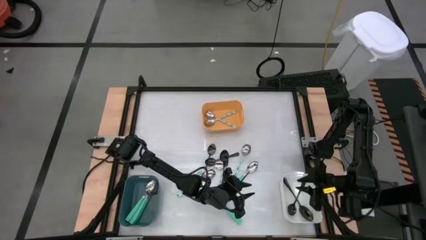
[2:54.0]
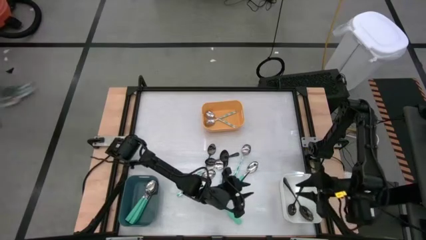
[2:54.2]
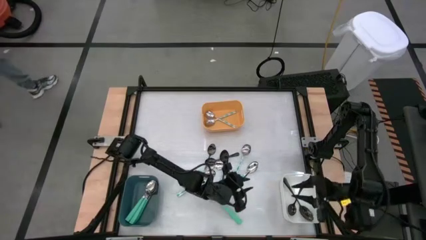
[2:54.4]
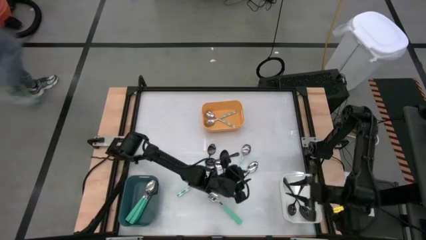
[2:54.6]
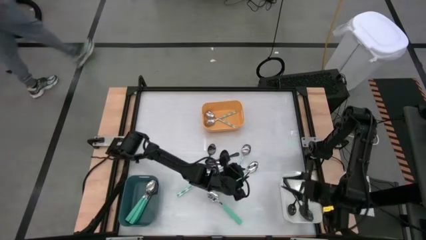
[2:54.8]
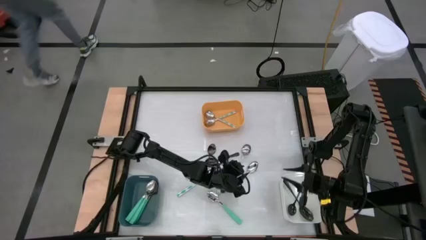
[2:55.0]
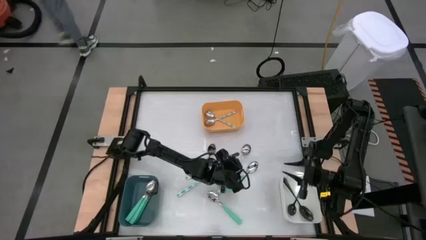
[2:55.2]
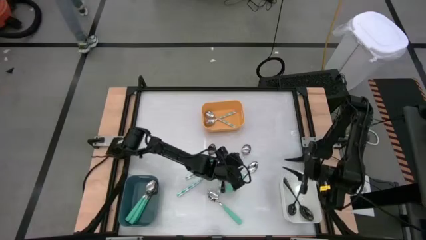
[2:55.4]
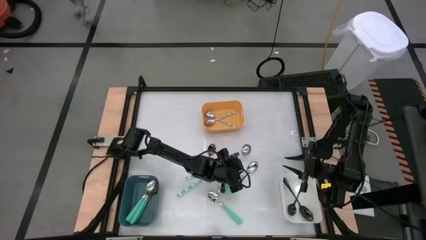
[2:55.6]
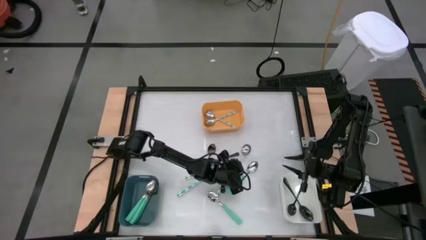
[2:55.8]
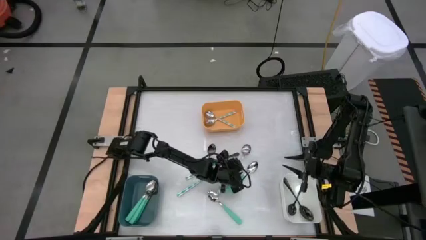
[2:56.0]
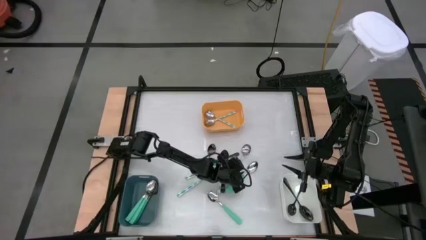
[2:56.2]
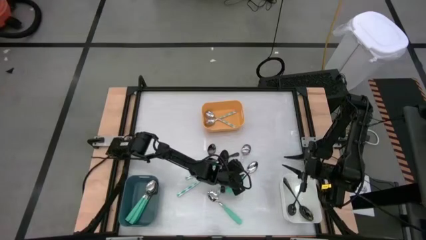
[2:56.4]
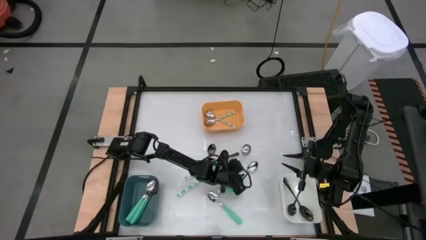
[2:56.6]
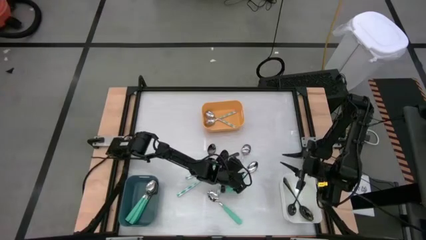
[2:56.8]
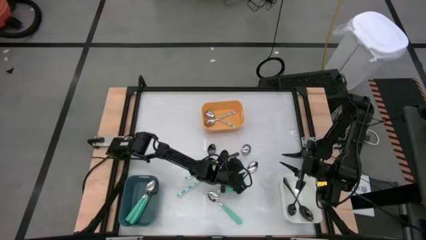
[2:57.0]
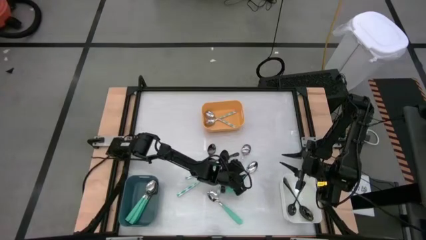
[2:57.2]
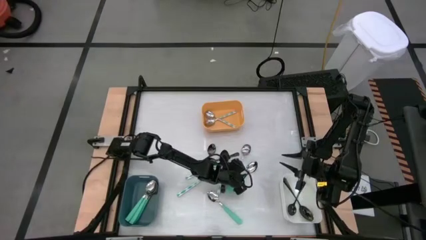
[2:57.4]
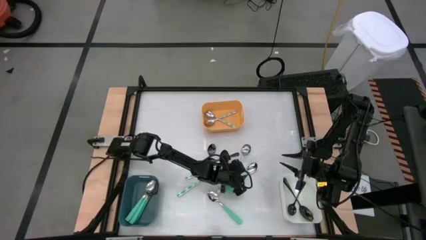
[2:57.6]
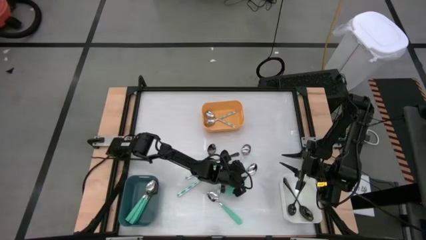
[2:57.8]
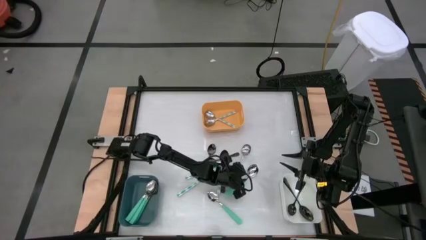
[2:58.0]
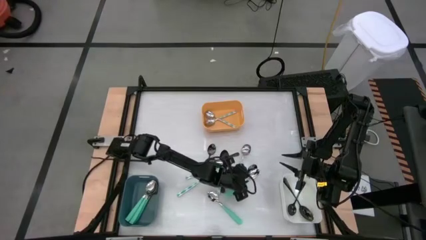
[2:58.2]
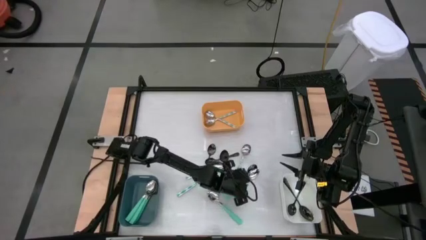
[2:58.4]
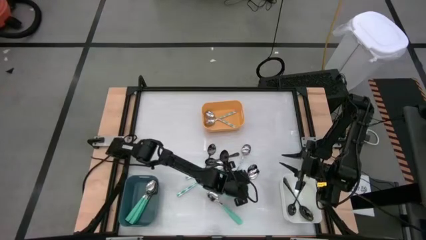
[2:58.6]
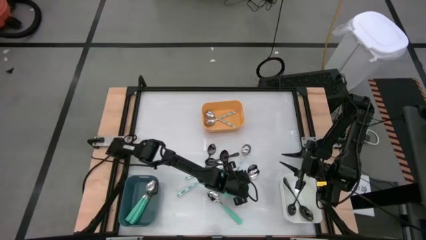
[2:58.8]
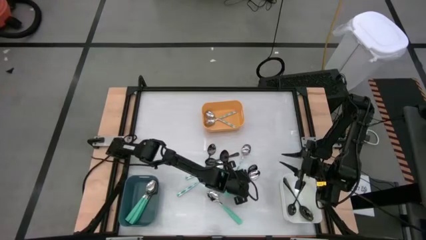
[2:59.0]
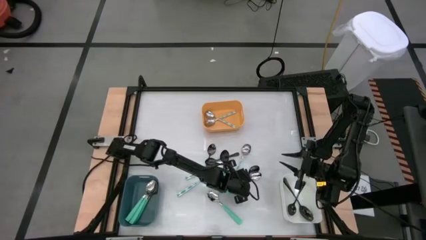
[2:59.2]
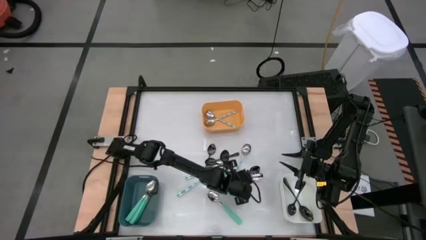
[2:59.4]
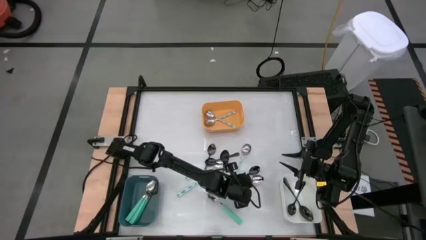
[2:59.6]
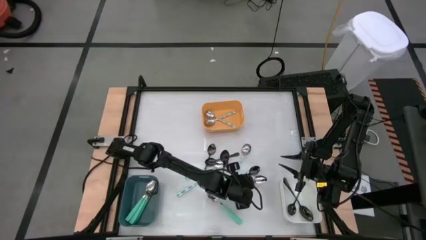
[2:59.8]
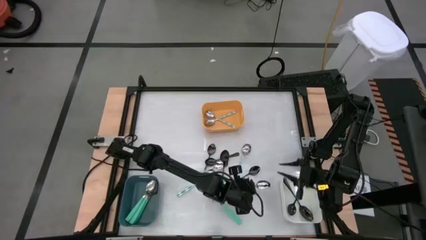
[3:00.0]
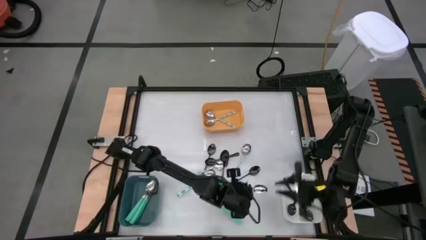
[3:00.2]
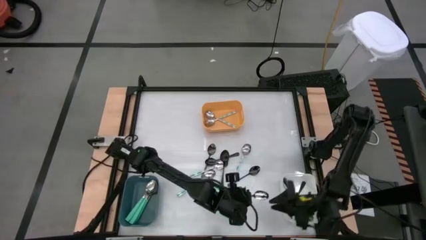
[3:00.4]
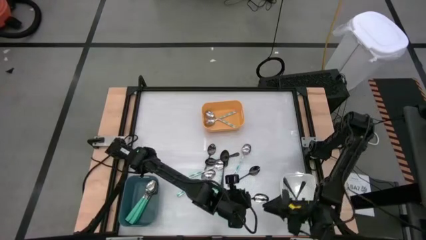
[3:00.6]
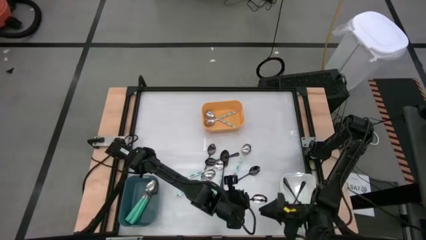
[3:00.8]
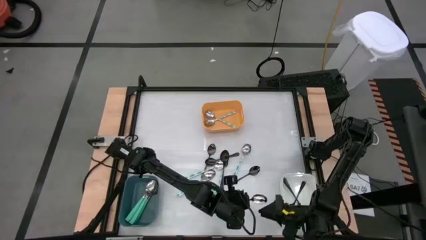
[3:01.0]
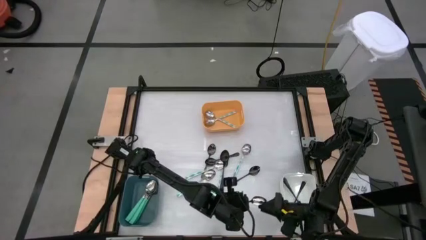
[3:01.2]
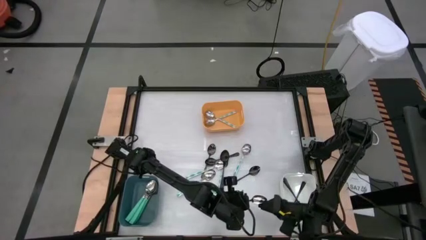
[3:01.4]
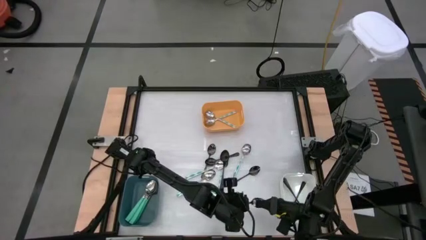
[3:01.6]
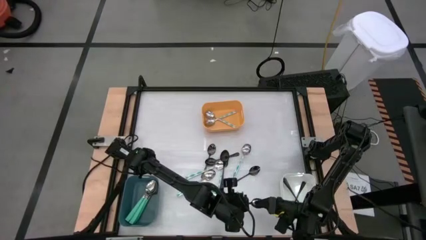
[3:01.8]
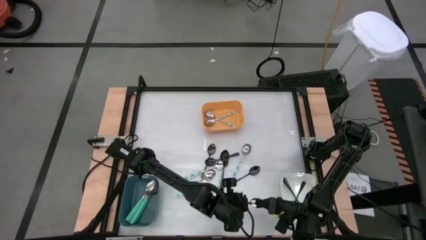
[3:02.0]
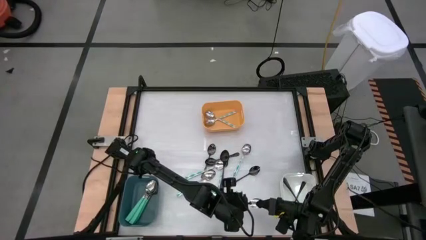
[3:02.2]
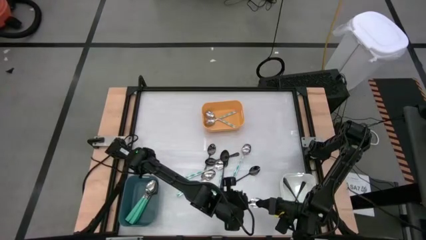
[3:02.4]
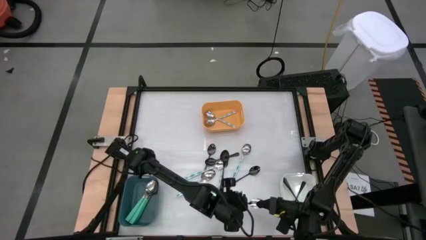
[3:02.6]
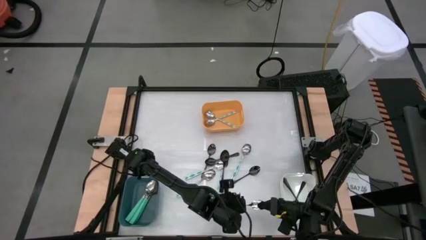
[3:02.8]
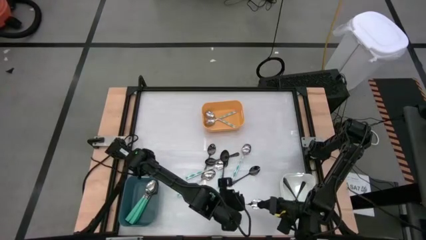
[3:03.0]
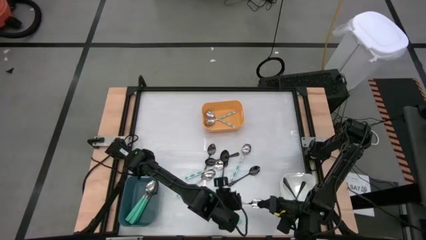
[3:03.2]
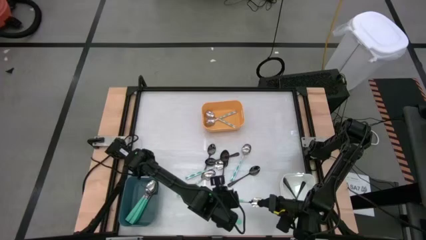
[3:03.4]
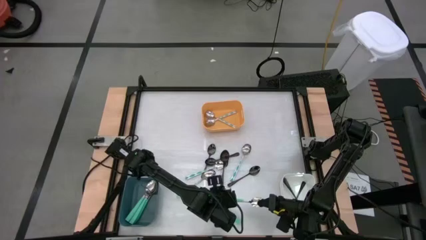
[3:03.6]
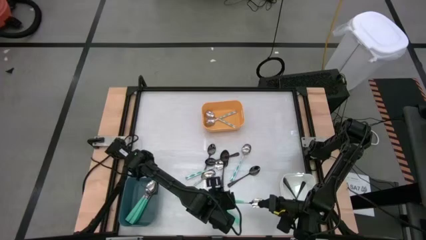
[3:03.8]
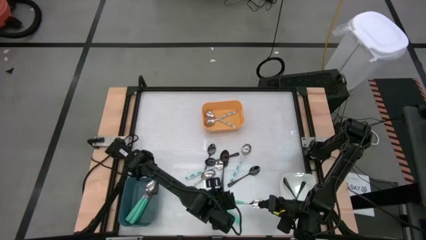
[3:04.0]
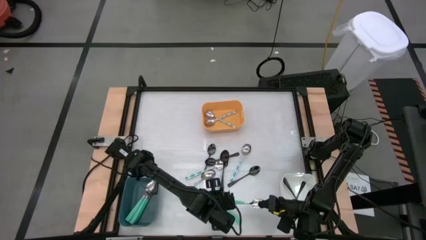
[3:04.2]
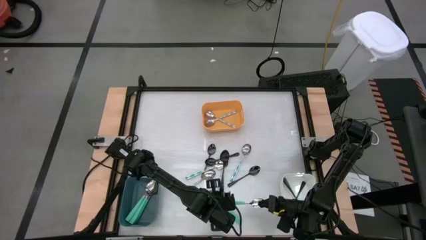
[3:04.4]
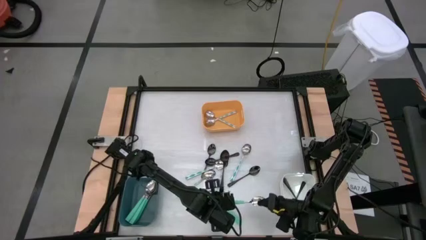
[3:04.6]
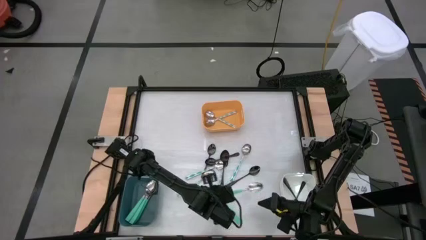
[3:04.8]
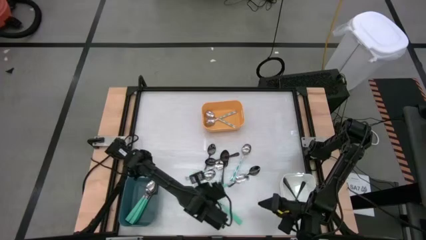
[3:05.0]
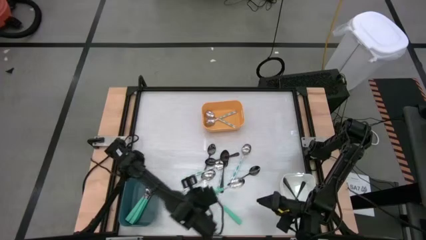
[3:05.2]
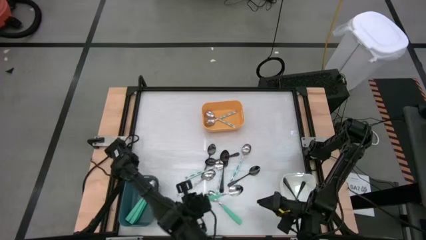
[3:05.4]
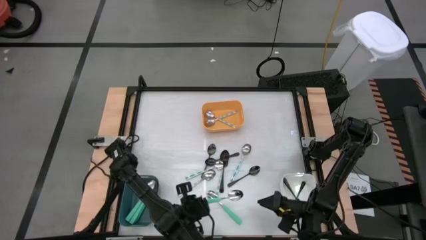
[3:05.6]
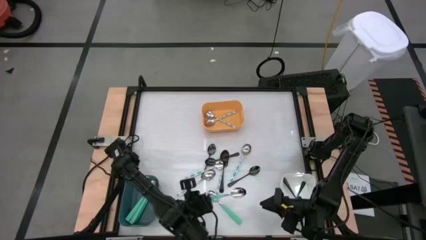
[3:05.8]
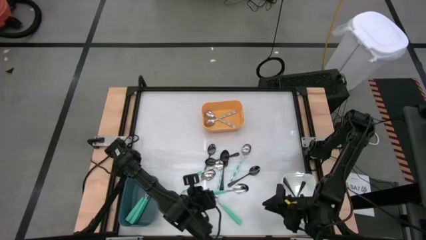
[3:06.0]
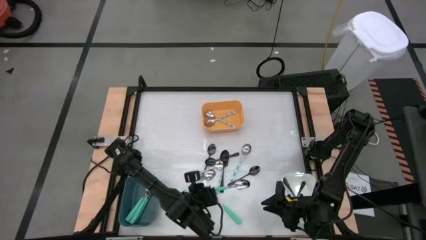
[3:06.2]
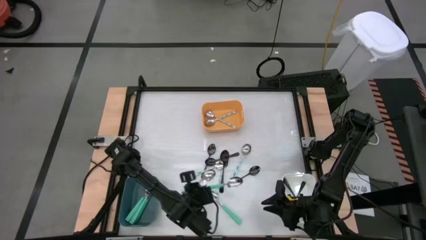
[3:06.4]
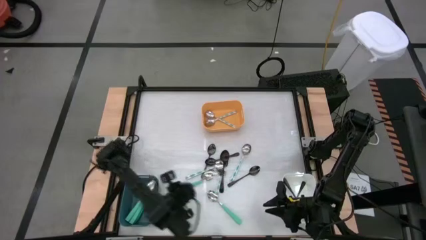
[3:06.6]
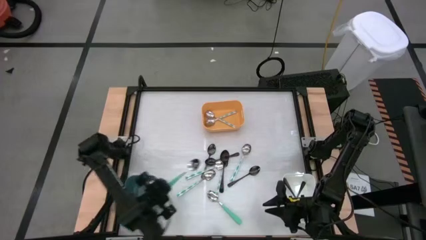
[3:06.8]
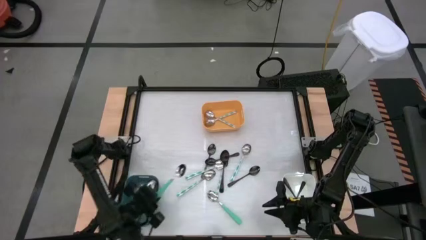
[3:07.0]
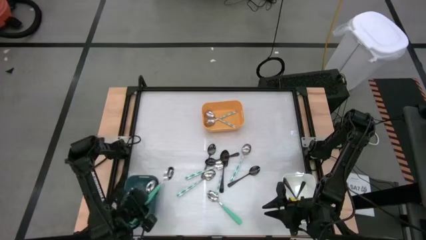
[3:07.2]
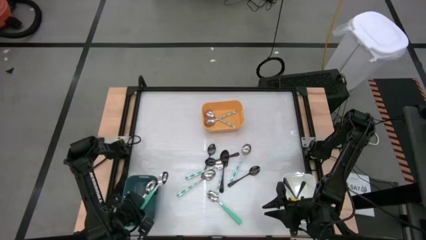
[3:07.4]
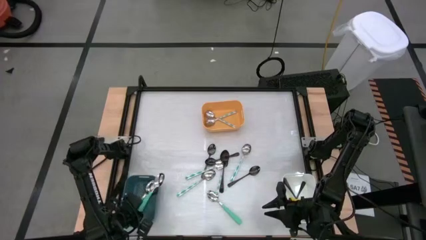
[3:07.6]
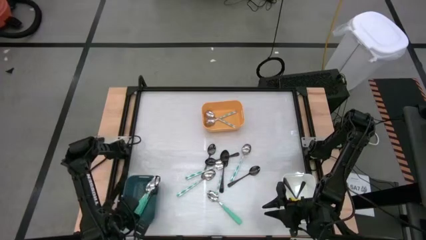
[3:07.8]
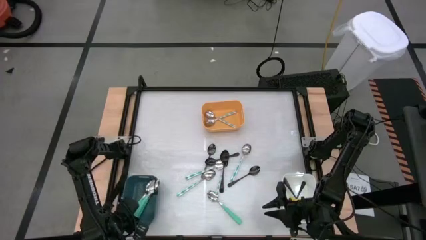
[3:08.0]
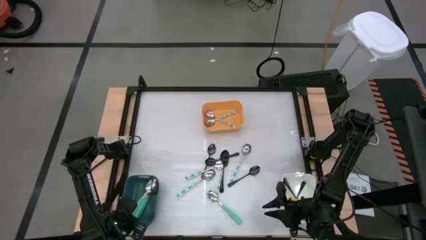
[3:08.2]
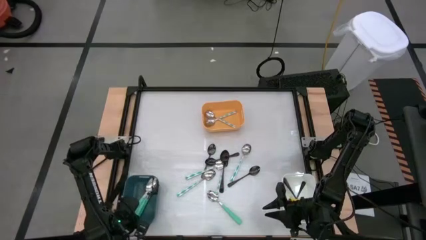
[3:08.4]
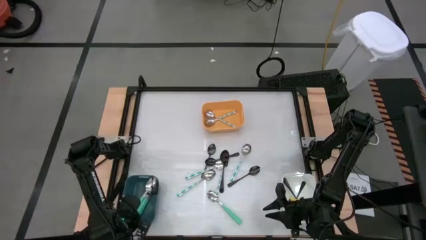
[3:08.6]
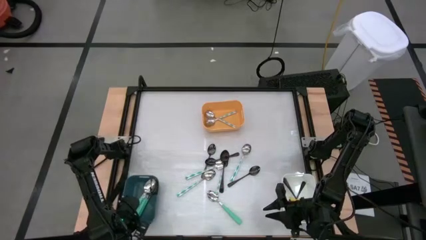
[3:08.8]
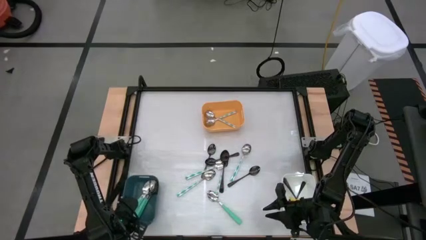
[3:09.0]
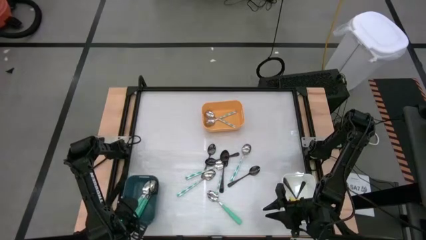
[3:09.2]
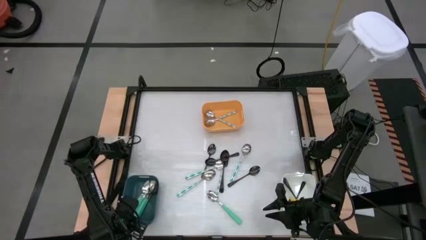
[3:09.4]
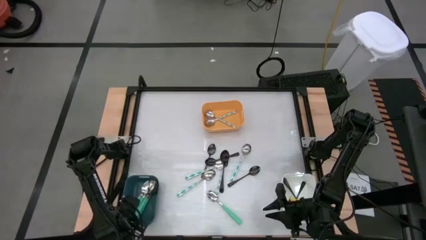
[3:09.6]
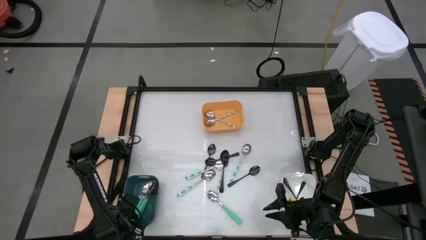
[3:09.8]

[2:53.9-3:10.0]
Task: Sort silverware by color (type)
Put the green spoon into the blue bin
